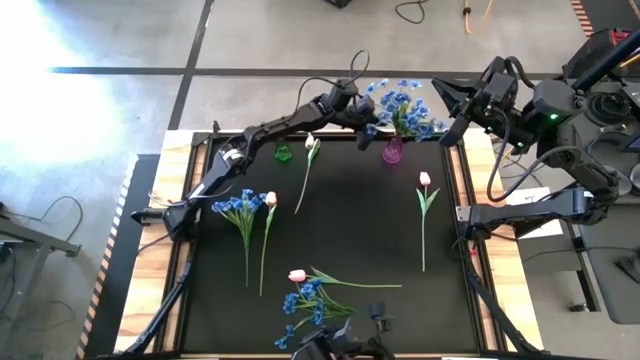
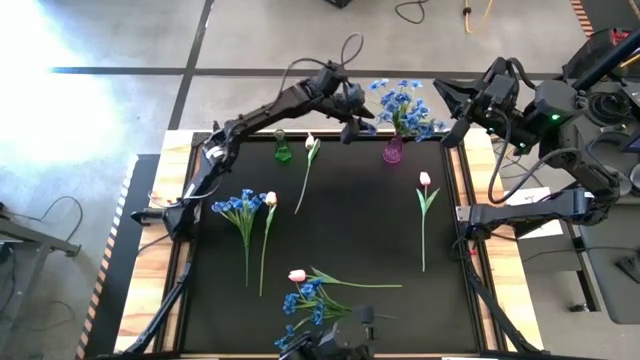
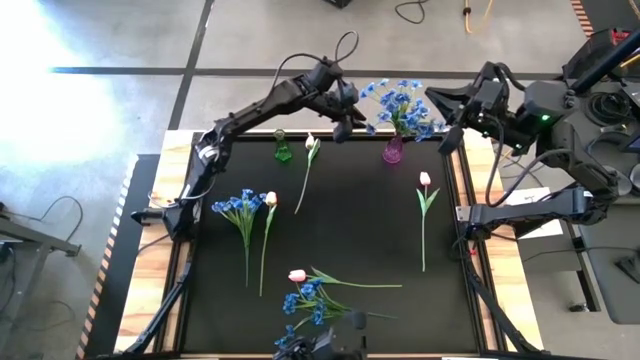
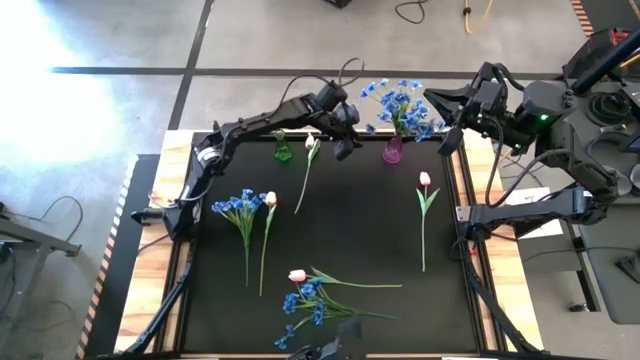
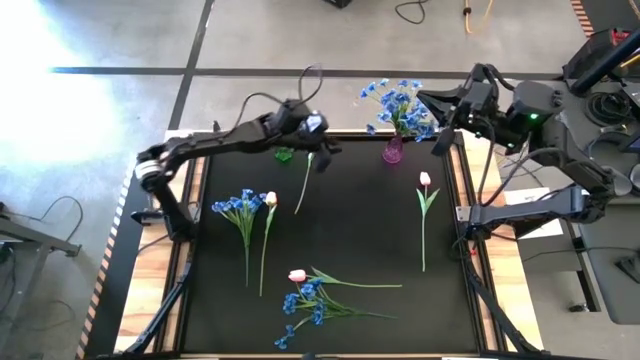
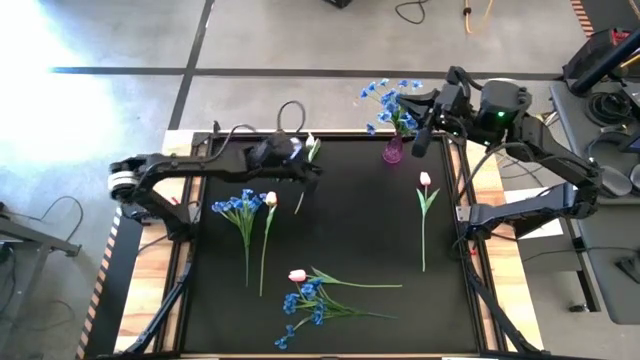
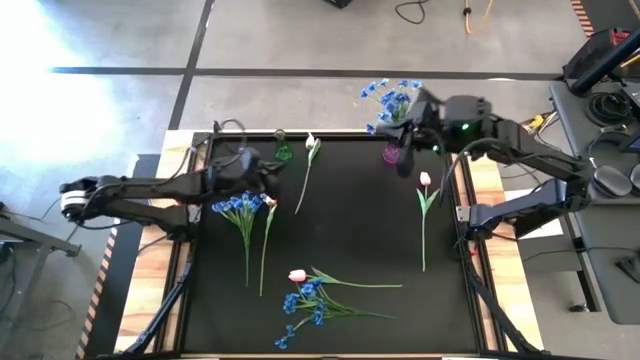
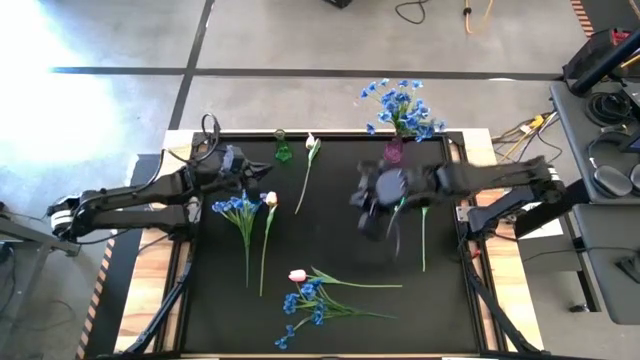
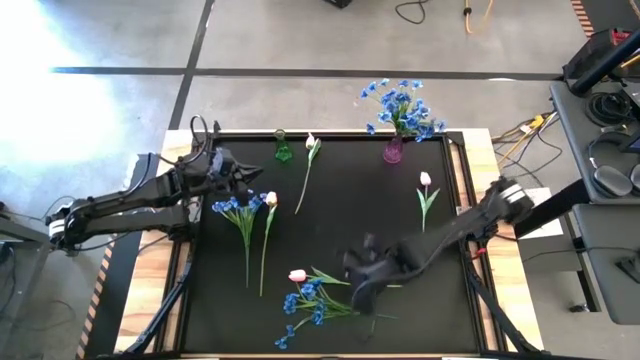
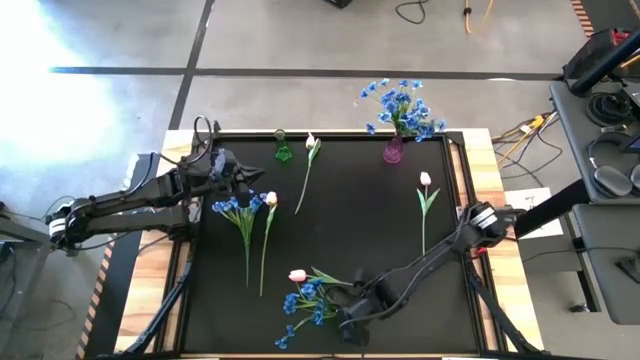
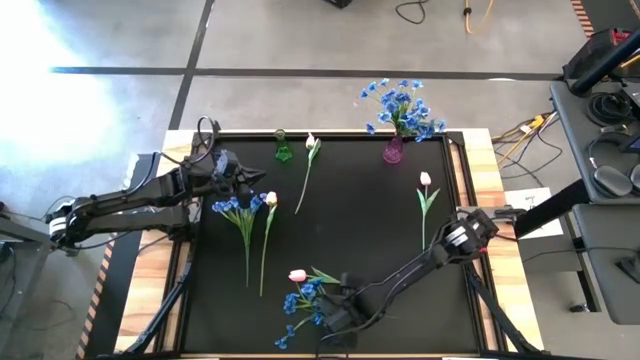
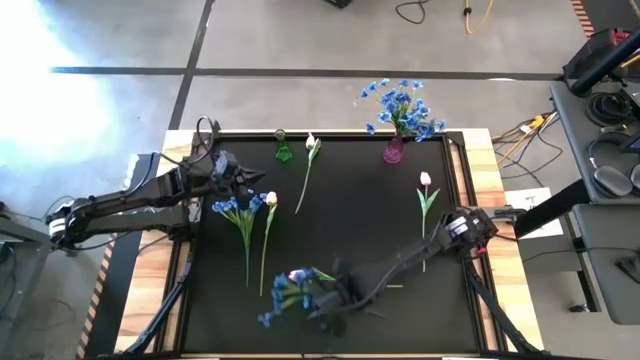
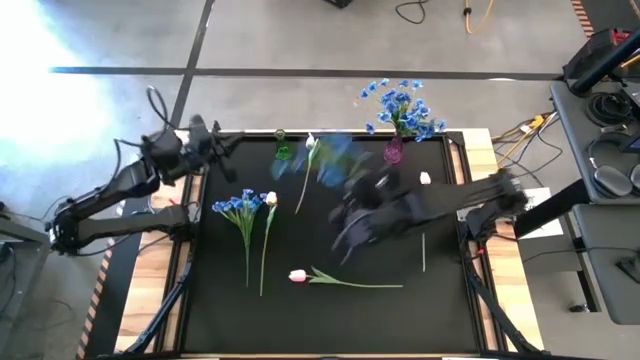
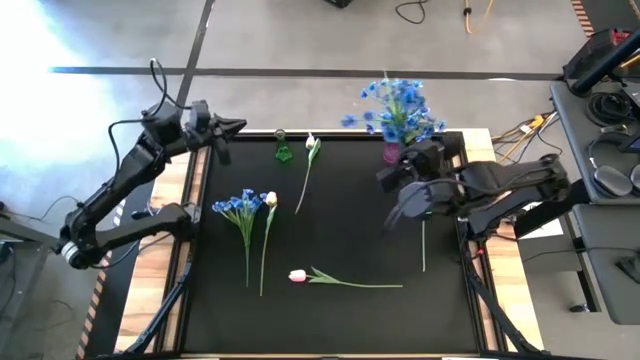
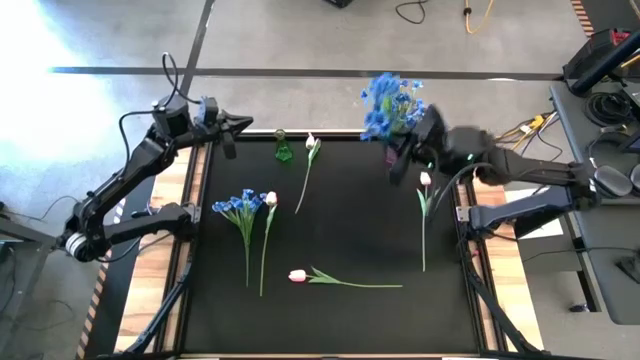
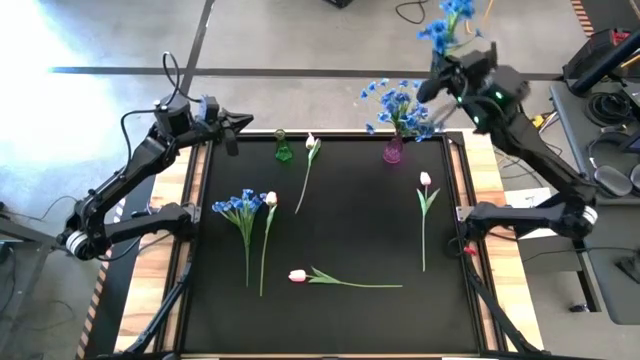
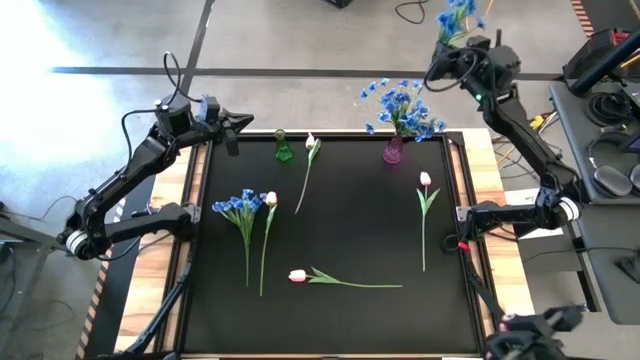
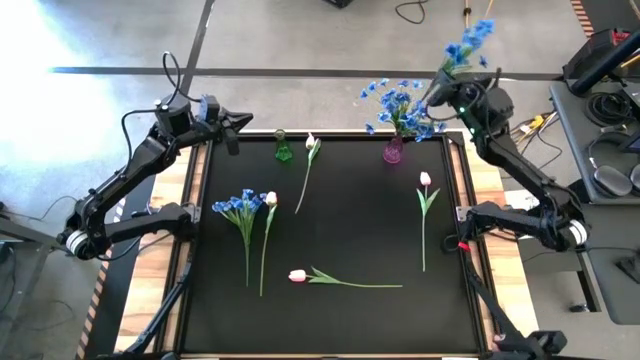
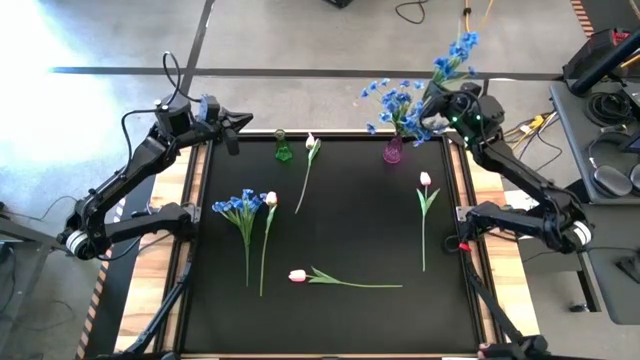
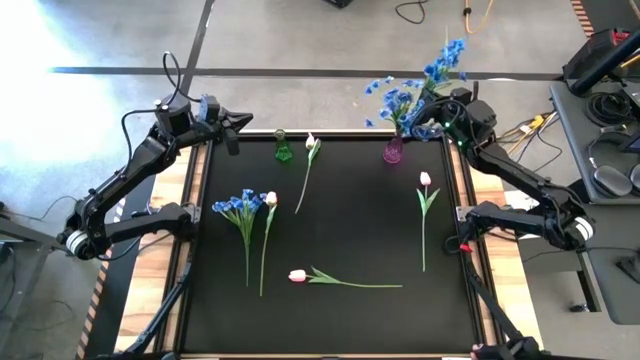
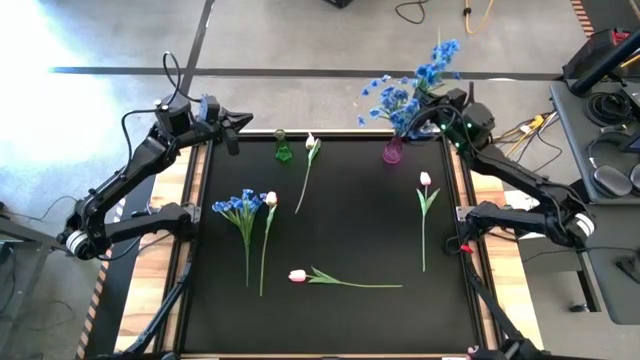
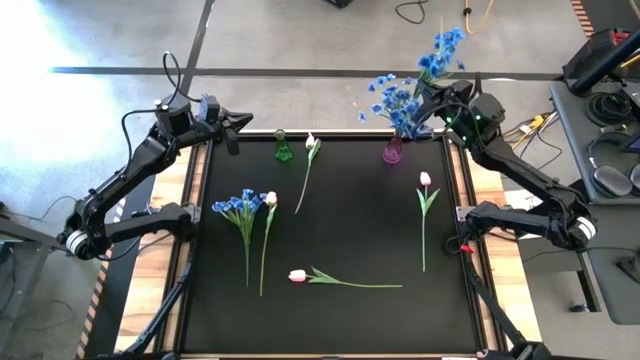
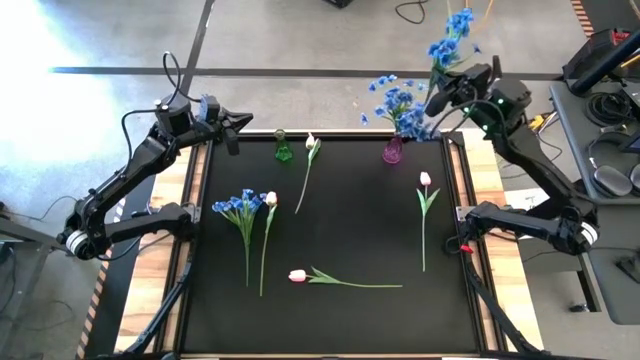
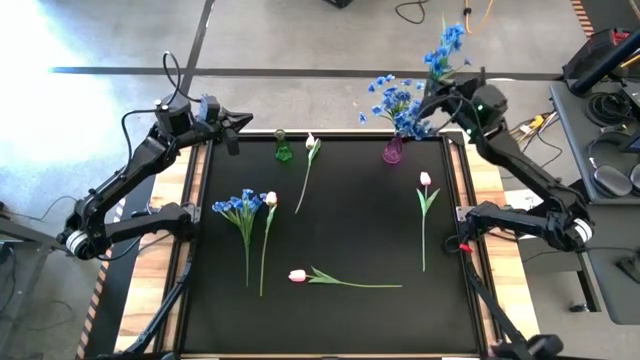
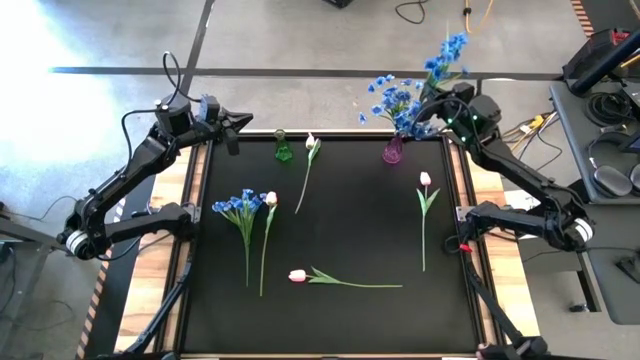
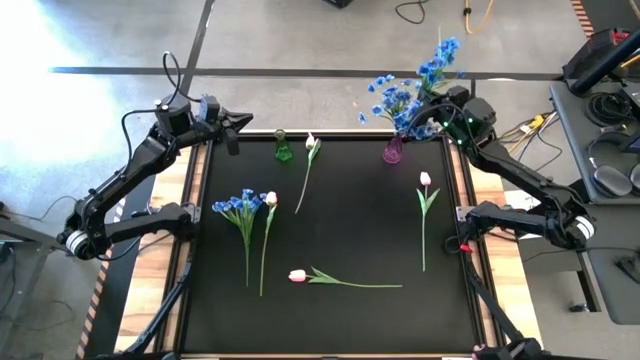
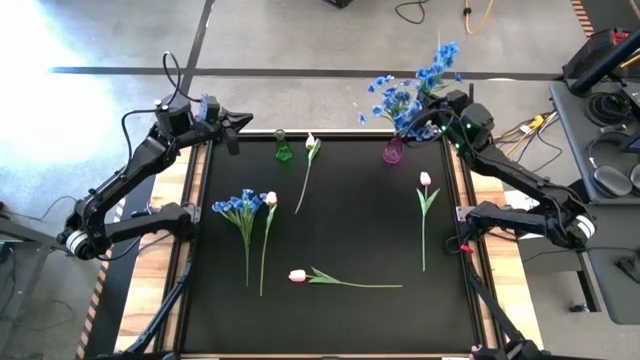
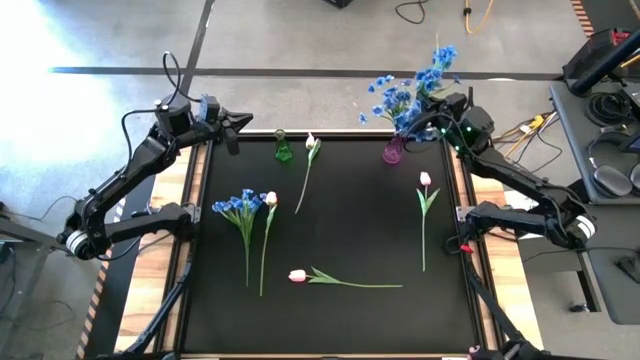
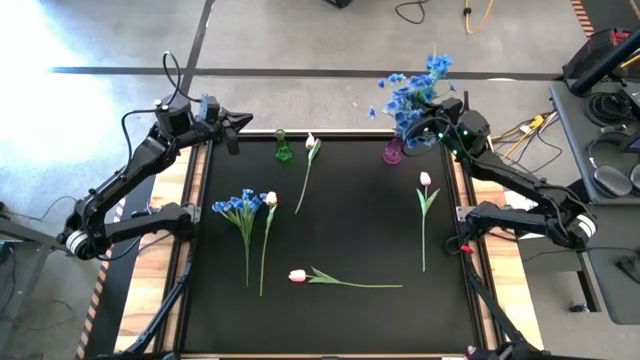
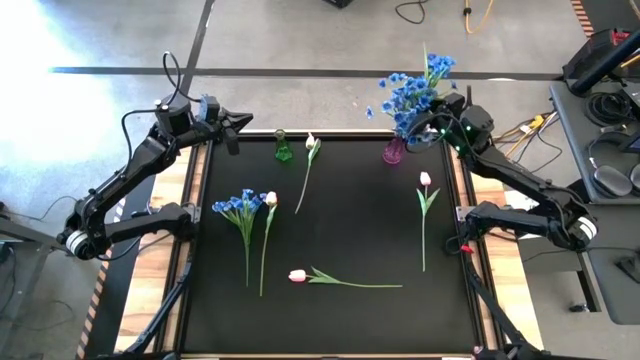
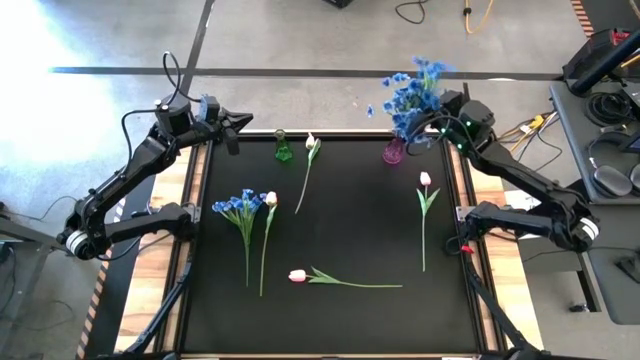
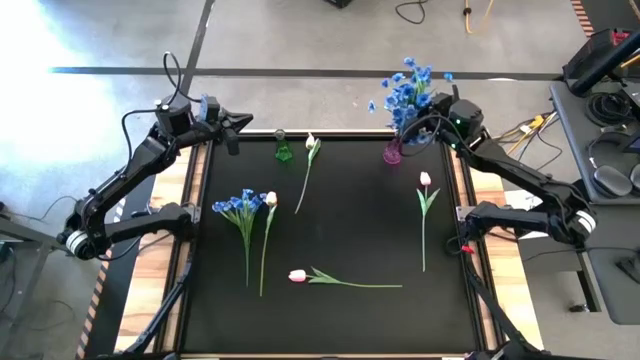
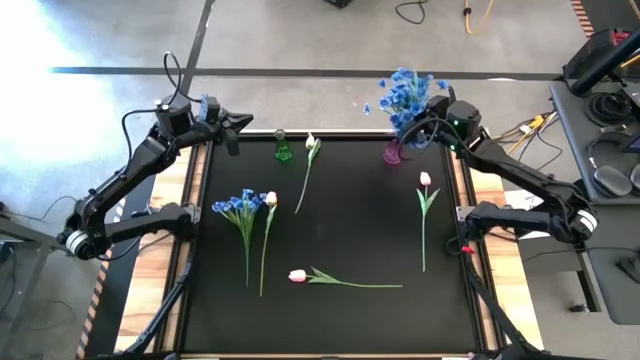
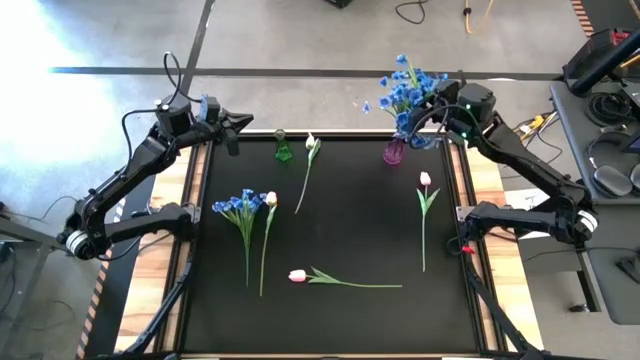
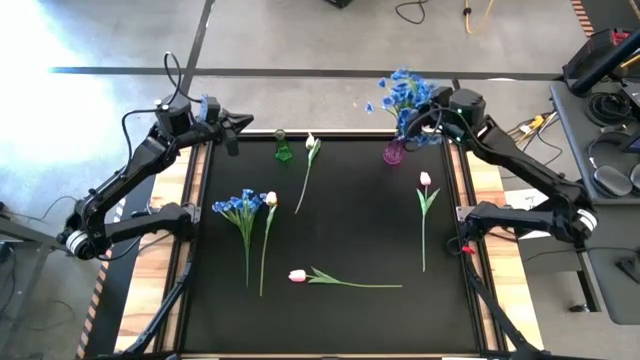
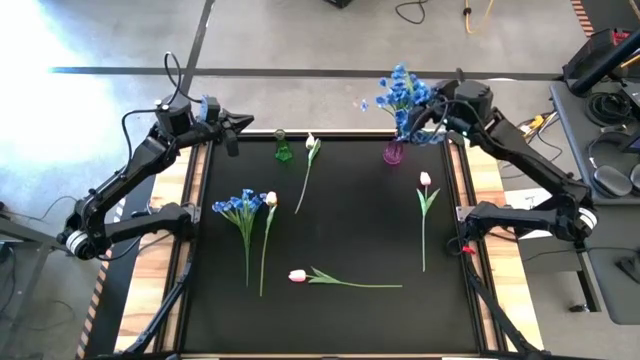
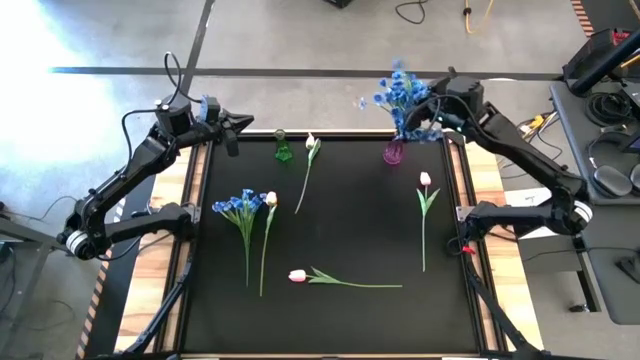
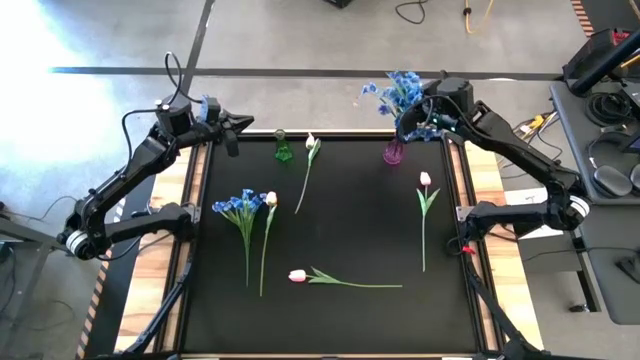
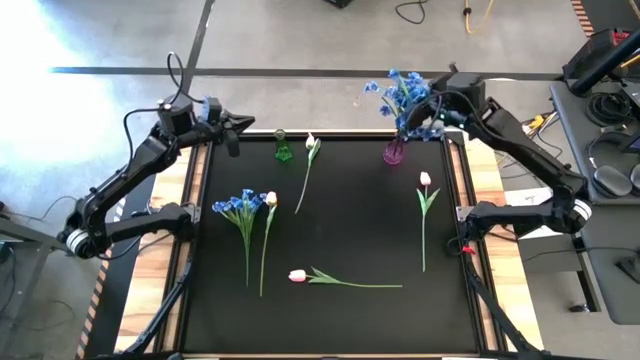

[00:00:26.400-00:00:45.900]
Task: Sort flowers into vase by color
Put the blue flowers into the violet vase

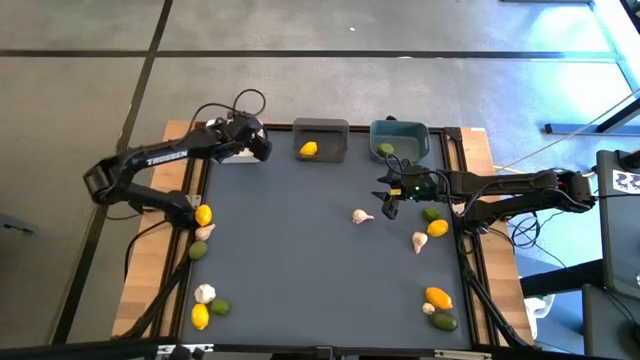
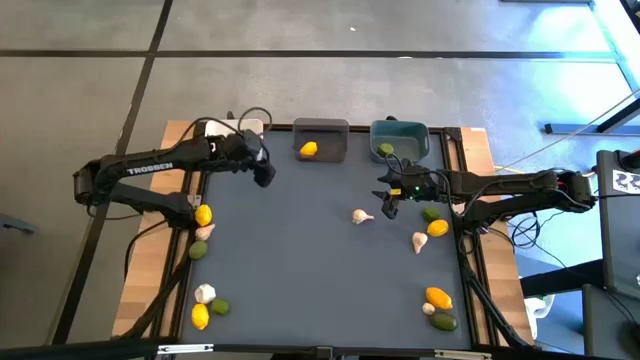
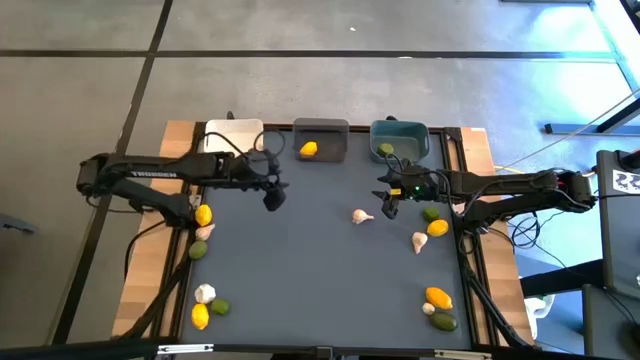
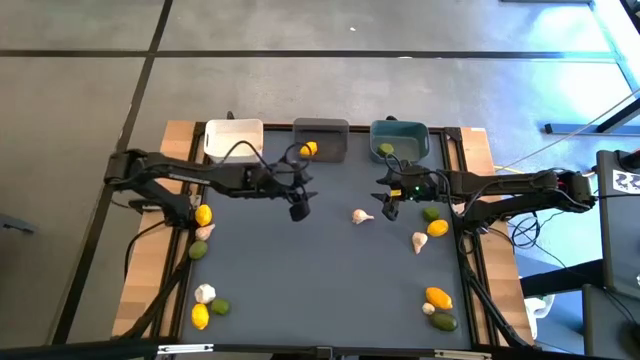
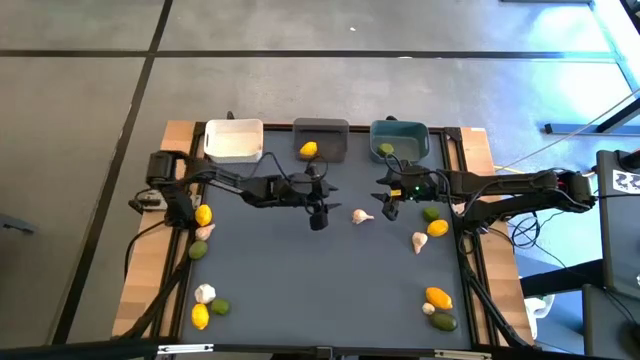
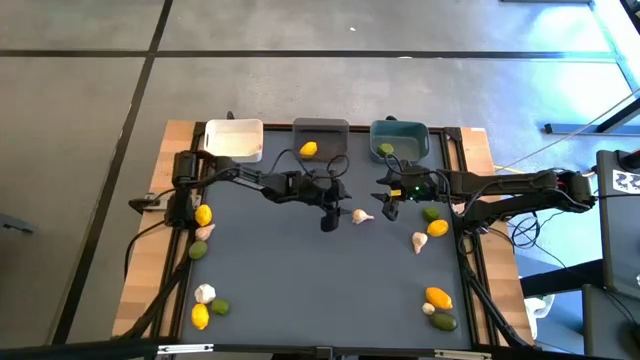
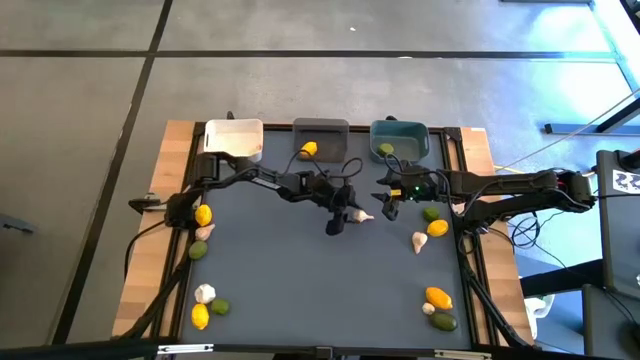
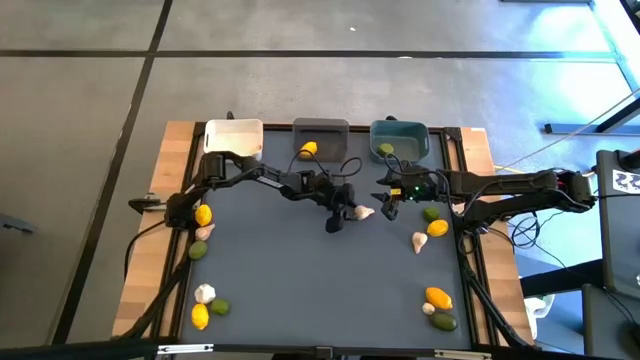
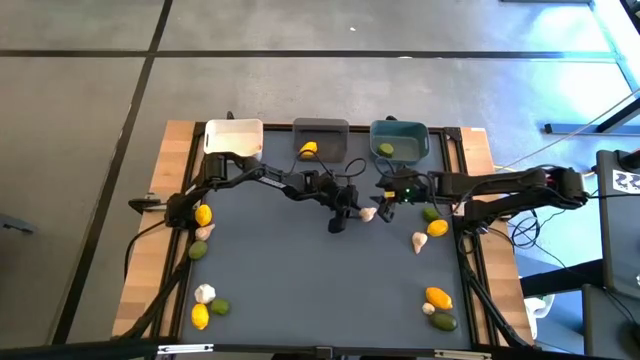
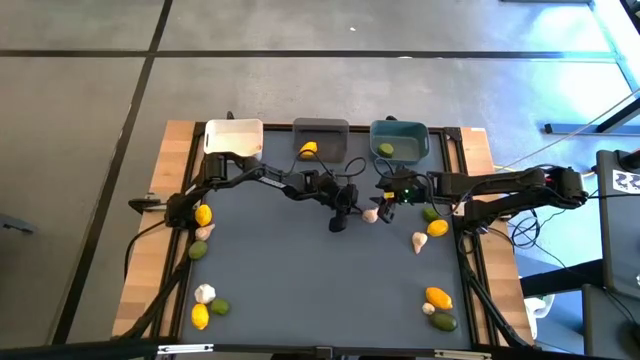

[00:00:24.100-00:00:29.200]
Task: Sort produce into baskets
Put the garlic into the white bin
